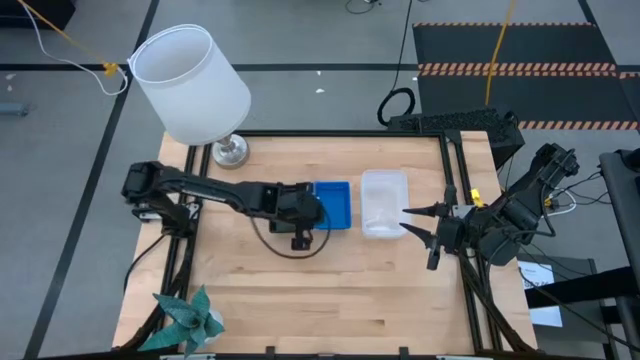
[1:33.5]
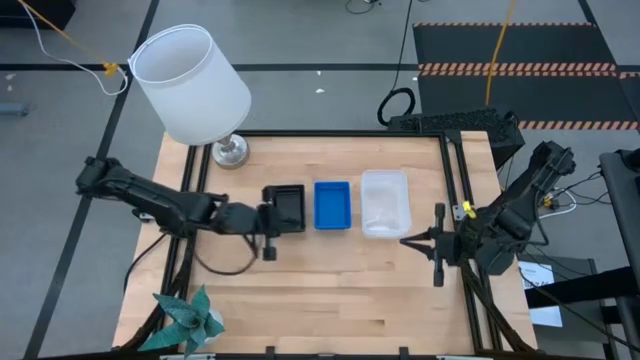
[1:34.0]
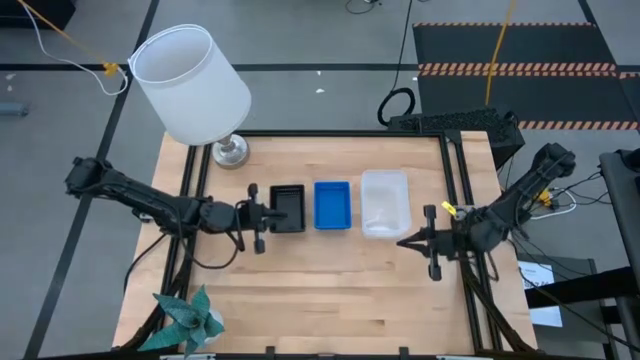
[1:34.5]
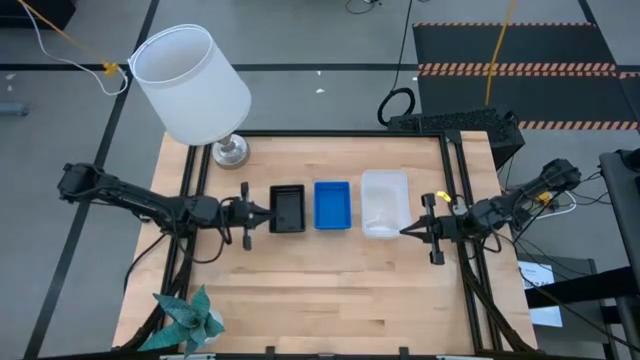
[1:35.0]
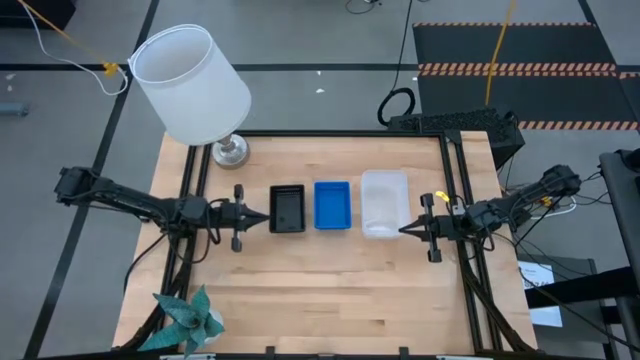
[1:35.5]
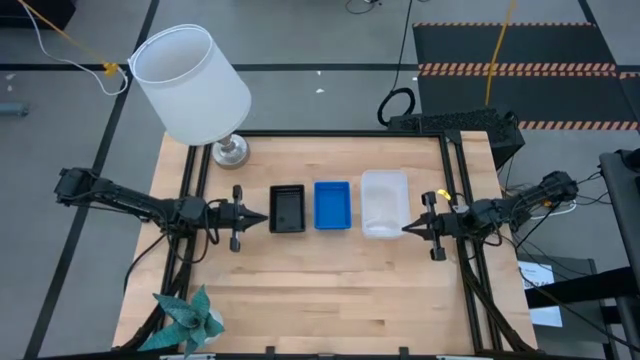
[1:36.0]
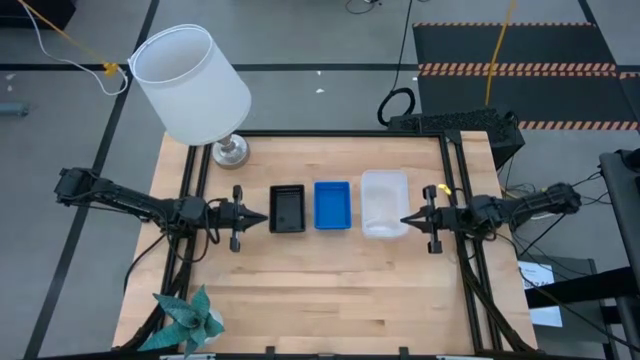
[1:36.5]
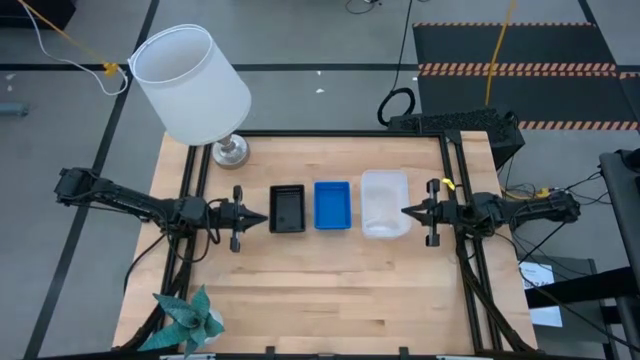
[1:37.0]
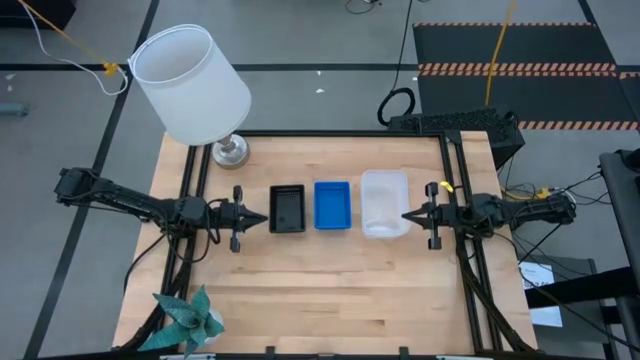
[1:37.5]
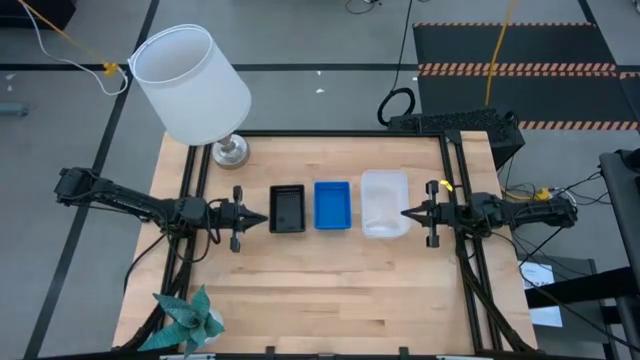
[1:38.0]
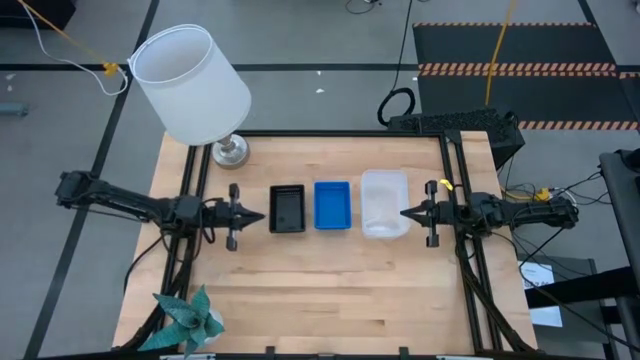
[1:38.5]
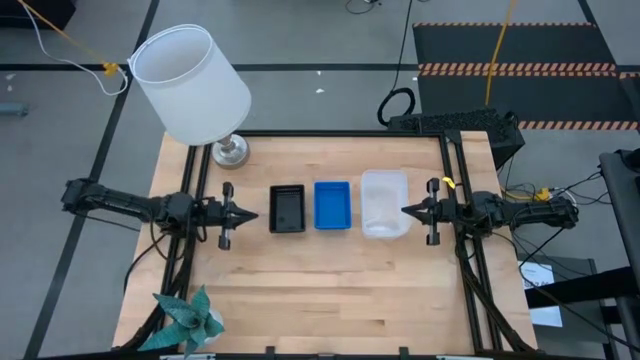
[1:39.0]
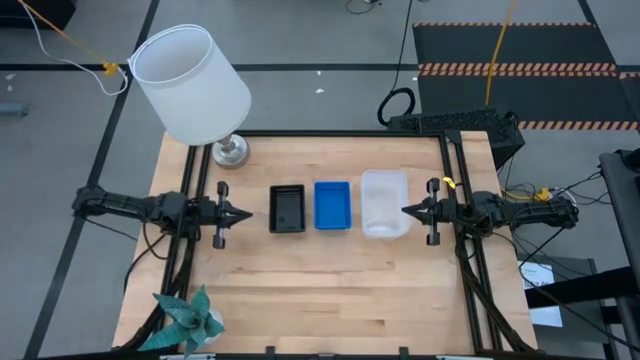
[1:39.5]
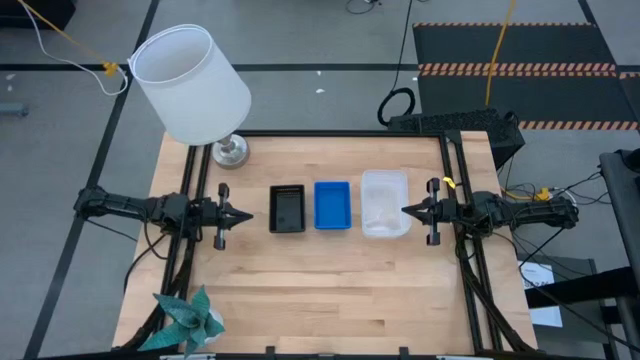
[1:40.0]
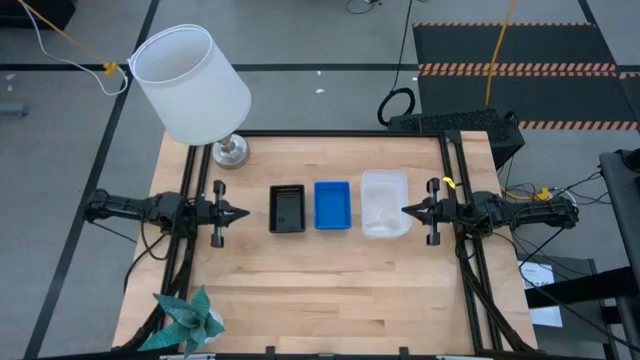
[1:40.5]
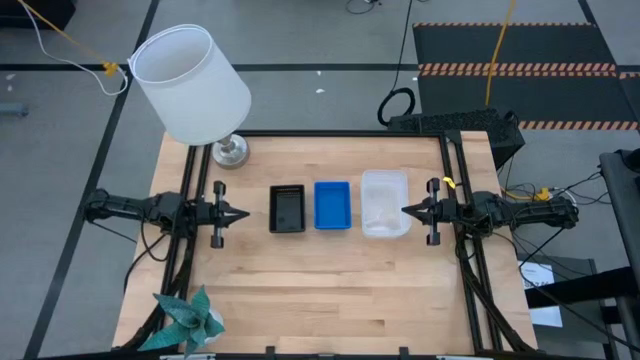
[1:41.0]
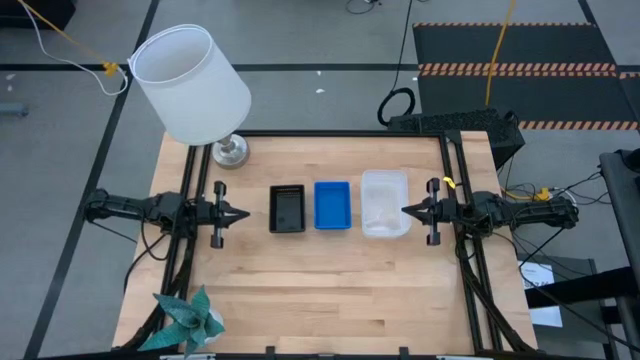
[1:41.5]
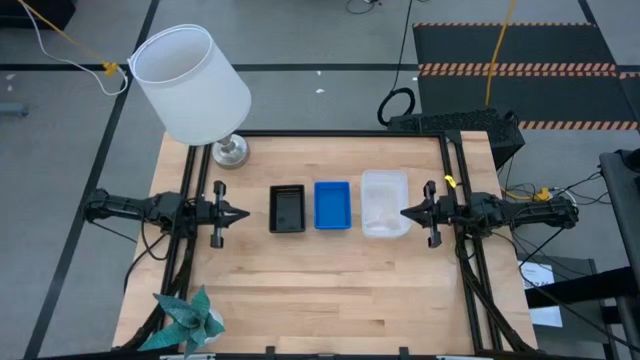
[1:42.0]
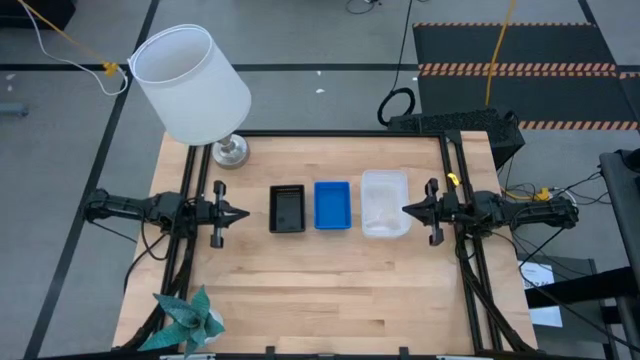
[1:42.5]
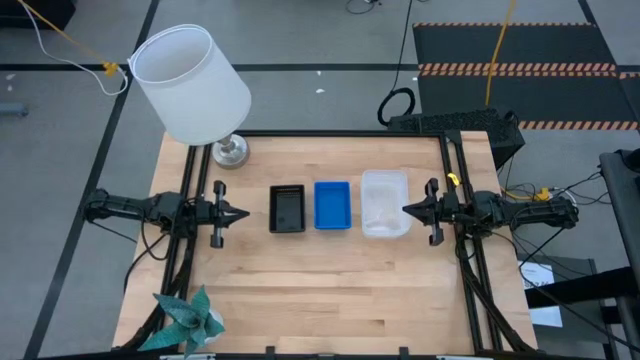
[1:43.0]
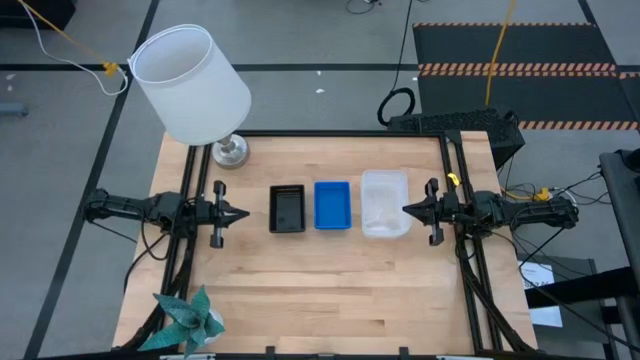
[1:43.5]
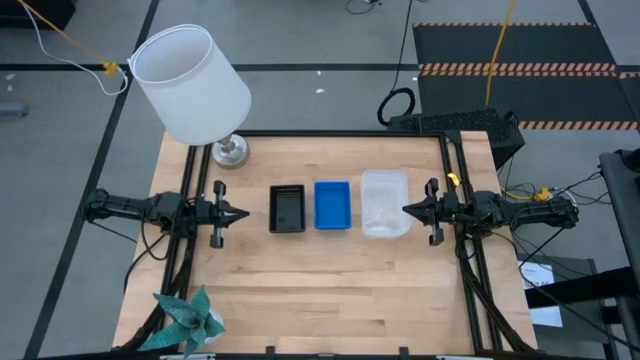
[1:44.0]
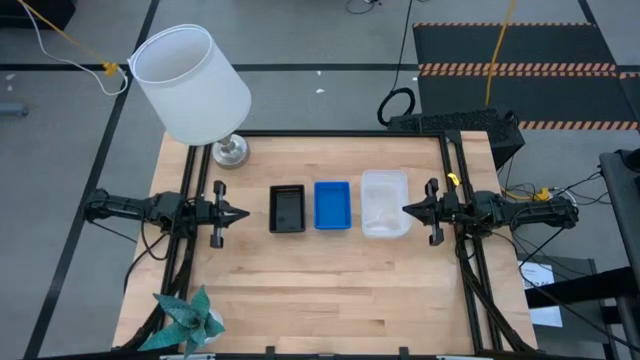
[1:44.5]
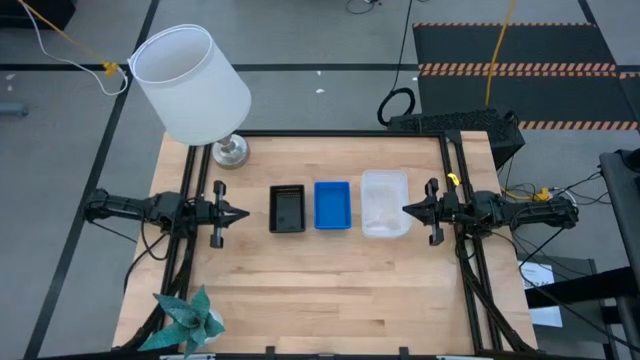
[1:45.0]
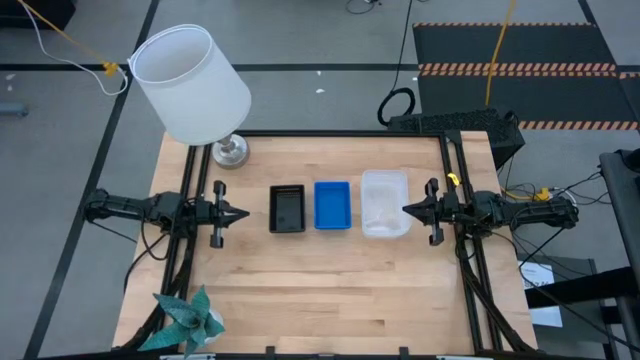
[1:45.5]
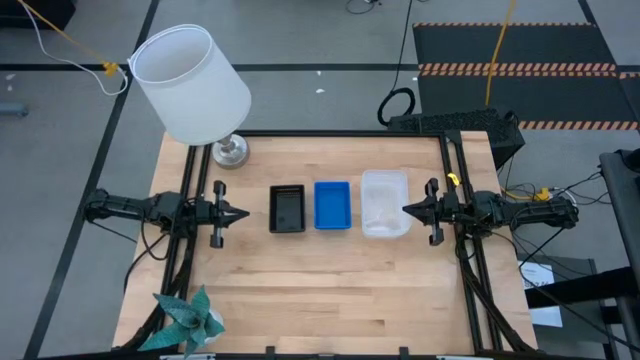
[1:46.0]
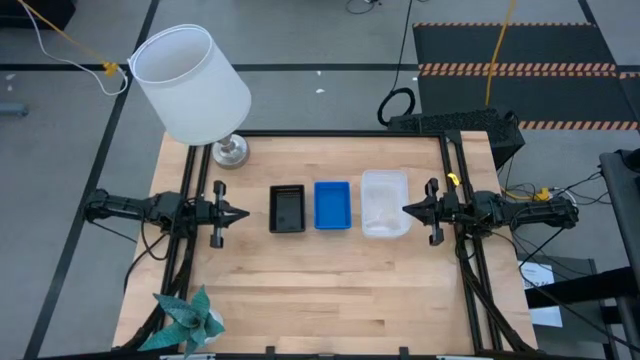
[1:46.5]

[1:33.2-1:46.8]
Return to Home Position

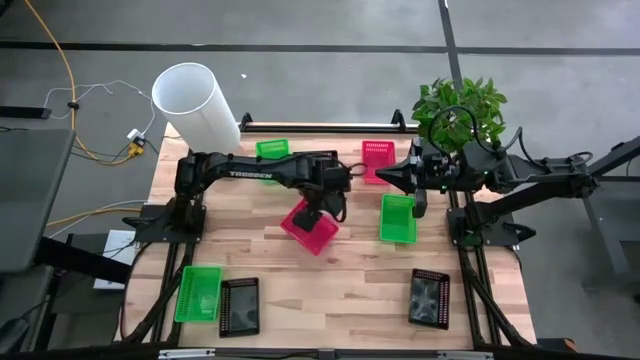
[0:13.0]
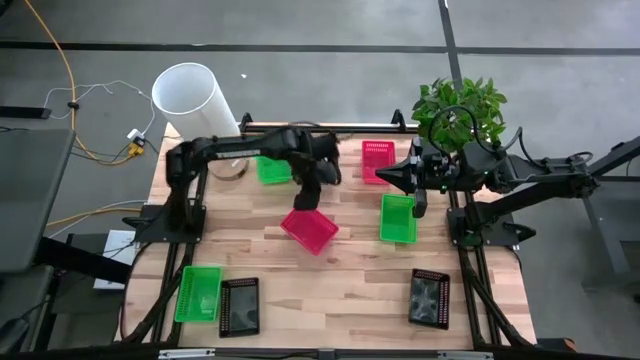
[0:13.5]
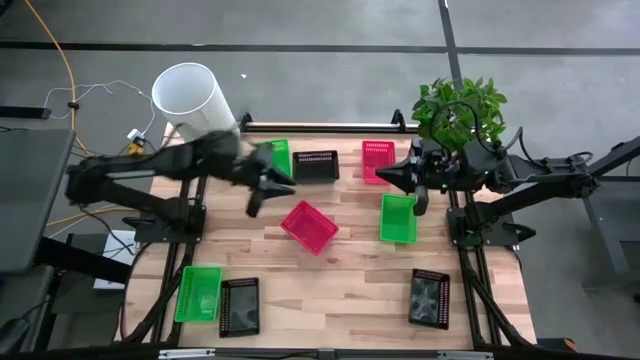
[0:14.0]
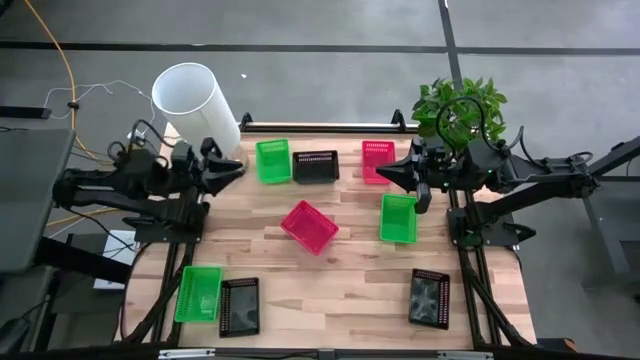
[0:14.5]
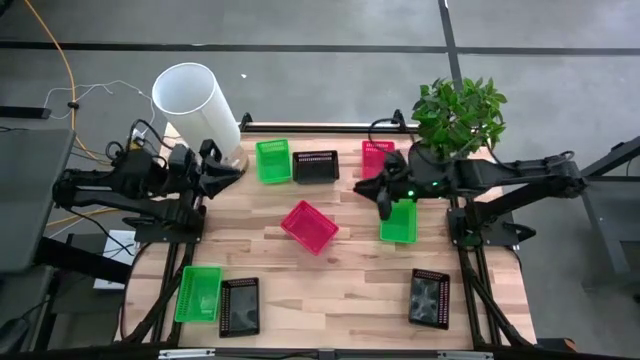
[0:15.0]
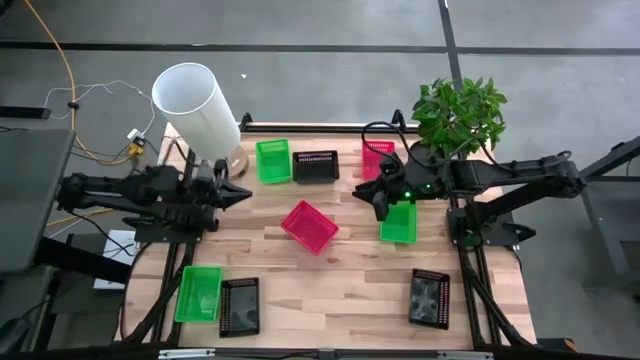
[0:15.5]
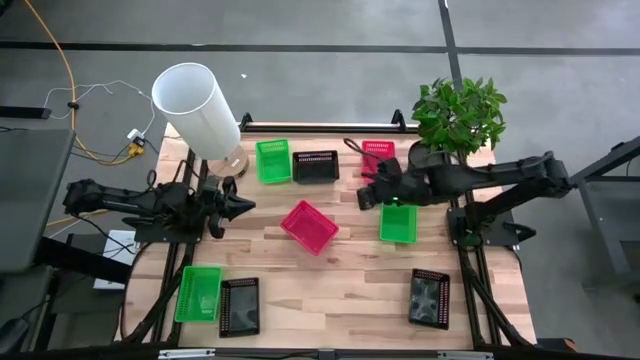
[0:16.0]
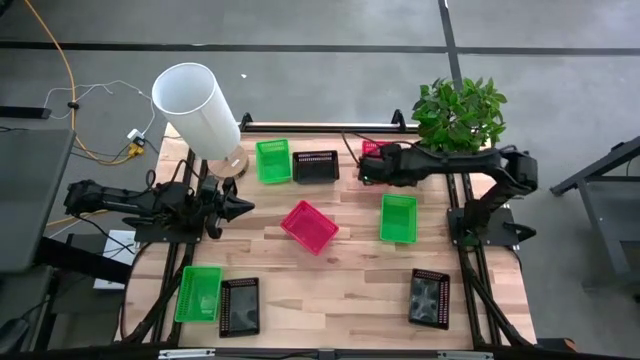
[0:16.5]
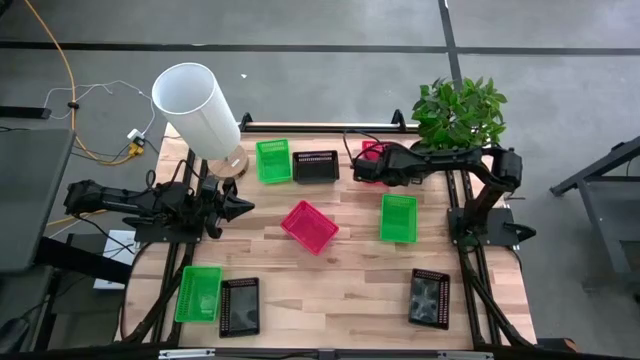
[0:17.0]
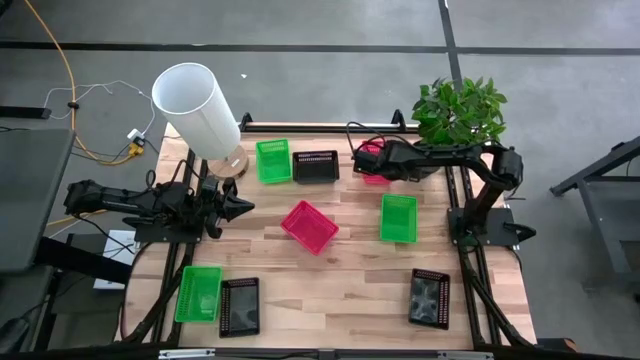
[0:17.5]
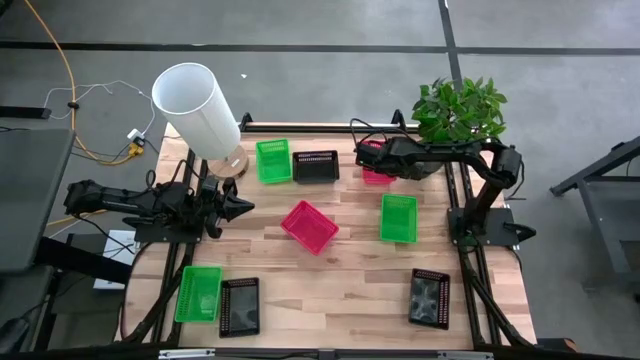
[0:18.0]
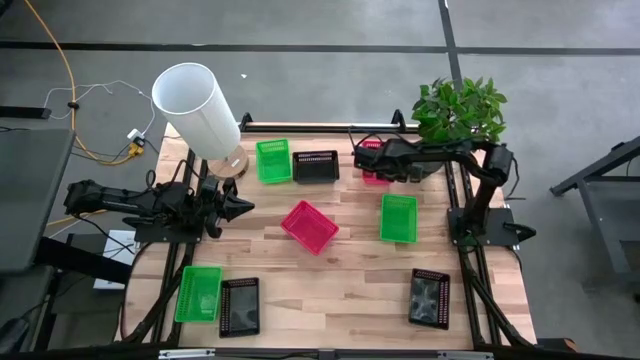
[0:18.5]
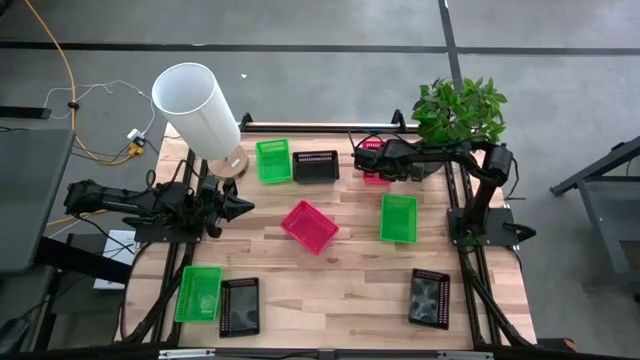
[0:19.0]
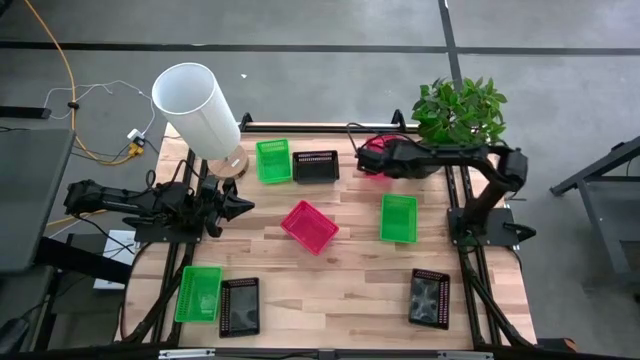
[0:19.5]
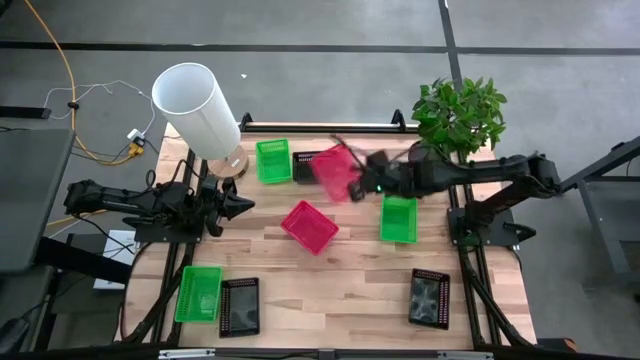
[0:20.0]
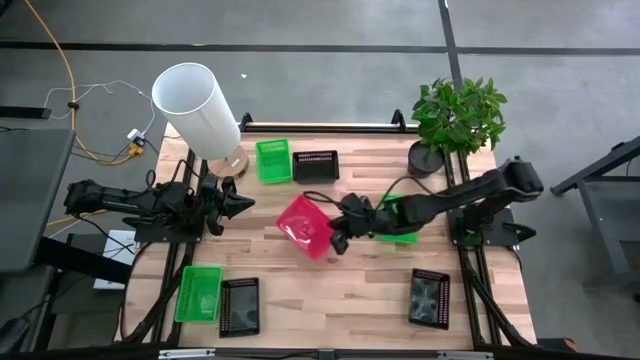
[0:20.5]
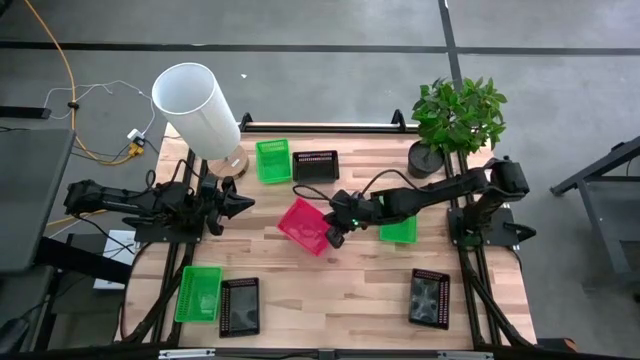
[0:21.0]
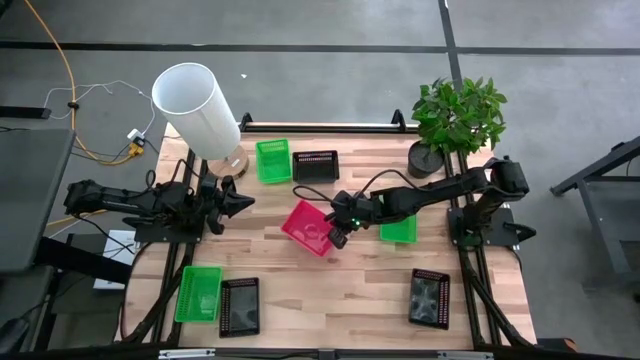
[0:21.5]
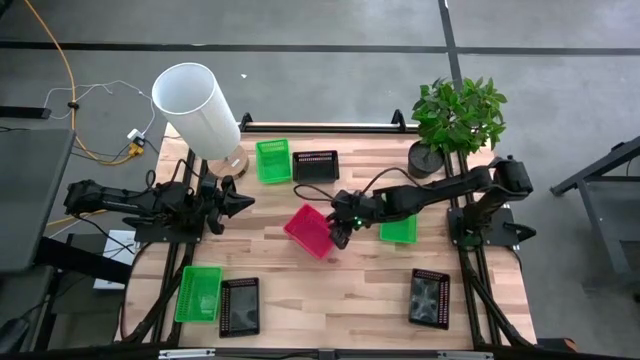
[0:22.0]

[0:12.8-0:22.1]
Stack the red bin on the red bin

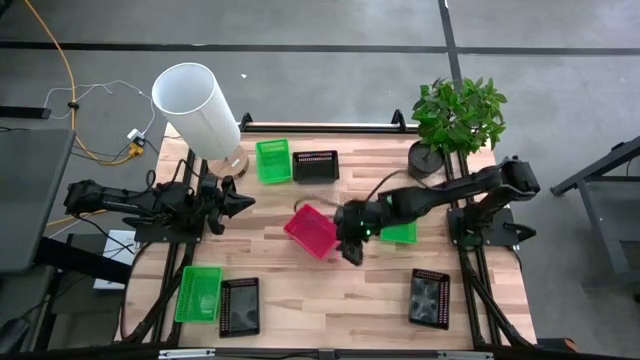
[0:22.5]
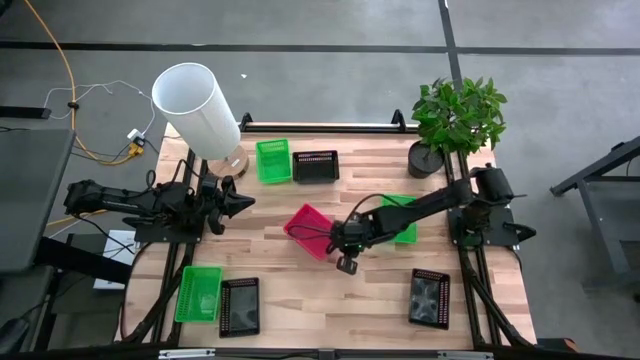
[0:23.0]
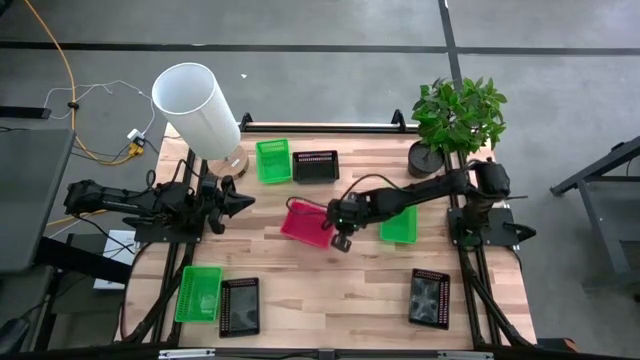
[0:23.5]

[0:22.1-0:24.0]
Adjust the red bins
